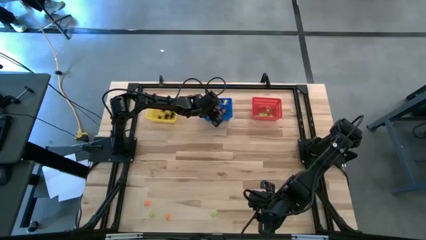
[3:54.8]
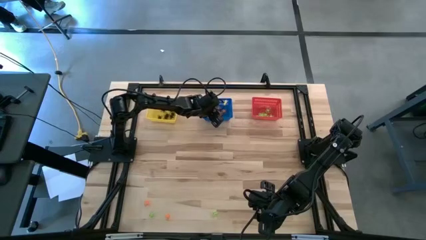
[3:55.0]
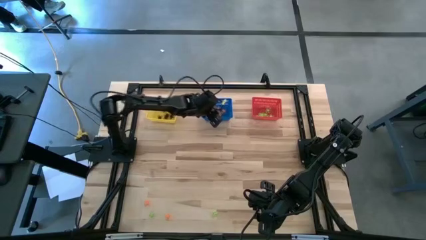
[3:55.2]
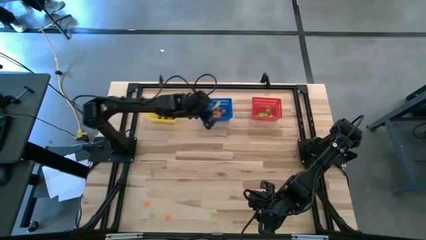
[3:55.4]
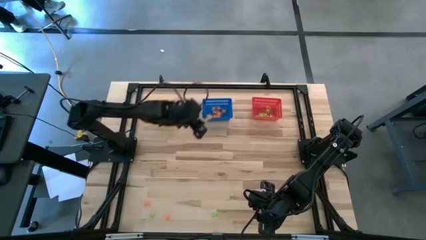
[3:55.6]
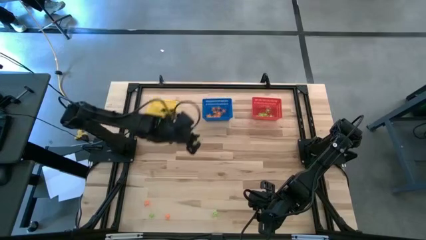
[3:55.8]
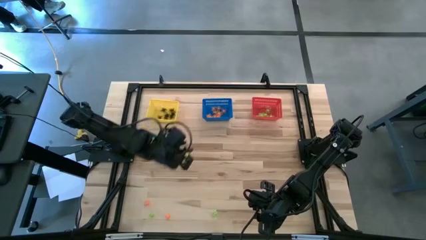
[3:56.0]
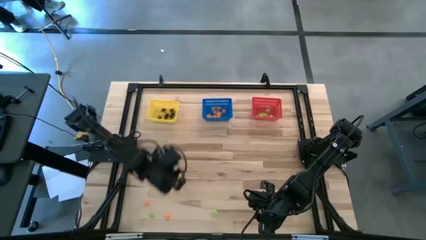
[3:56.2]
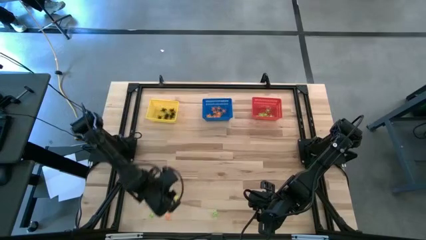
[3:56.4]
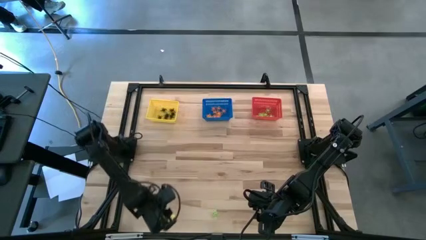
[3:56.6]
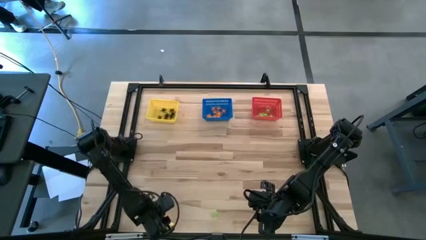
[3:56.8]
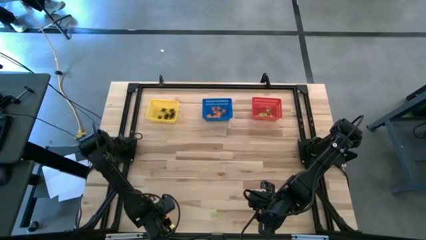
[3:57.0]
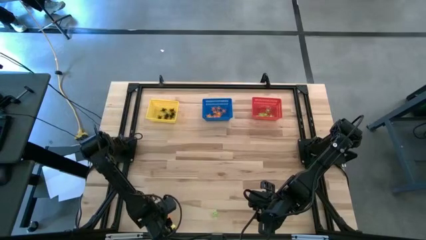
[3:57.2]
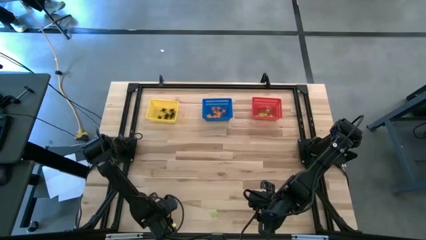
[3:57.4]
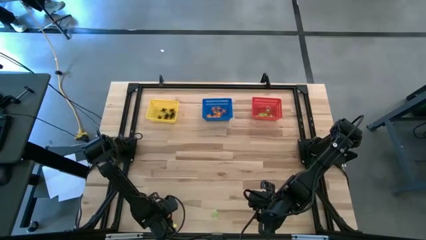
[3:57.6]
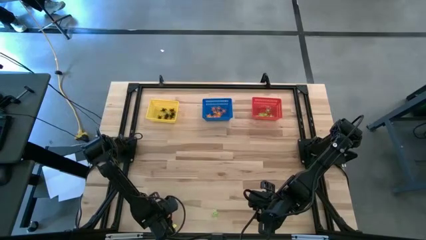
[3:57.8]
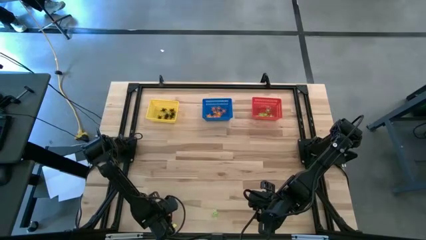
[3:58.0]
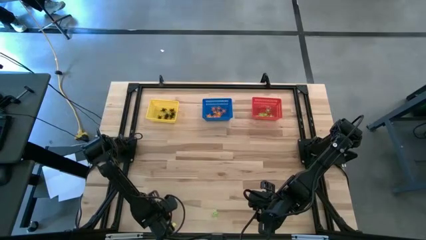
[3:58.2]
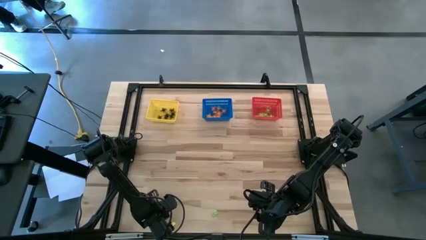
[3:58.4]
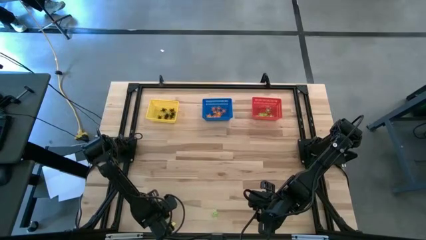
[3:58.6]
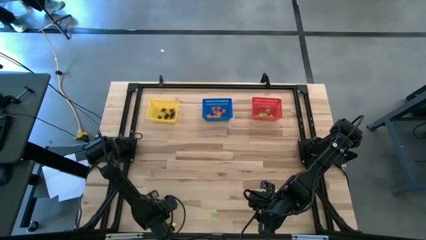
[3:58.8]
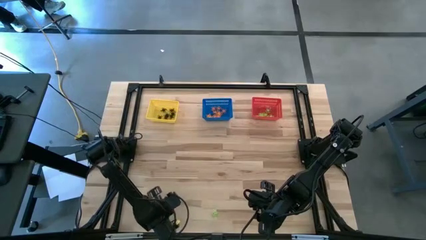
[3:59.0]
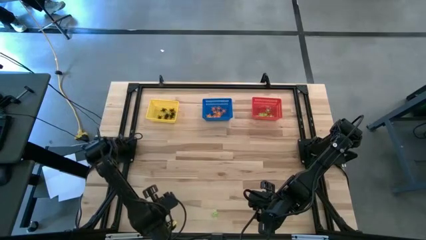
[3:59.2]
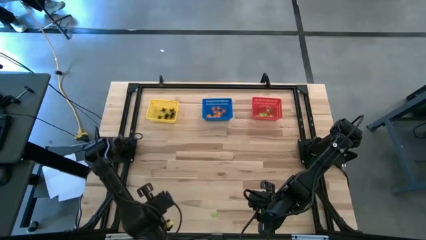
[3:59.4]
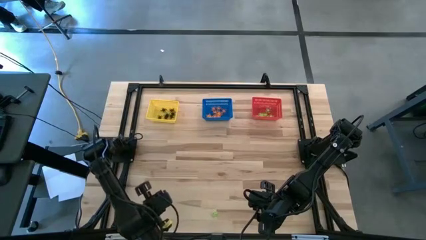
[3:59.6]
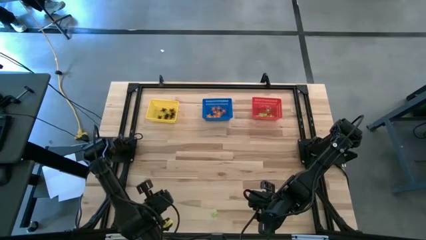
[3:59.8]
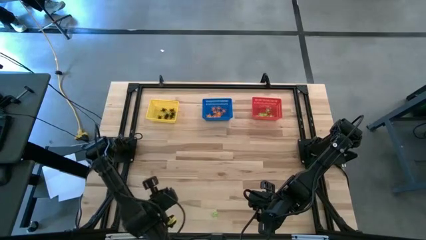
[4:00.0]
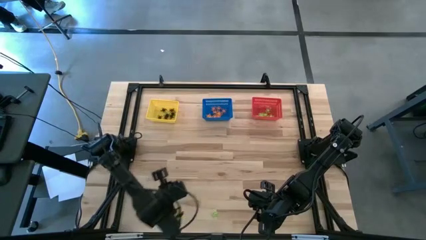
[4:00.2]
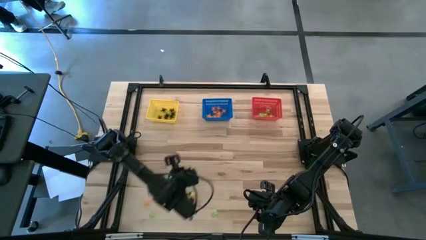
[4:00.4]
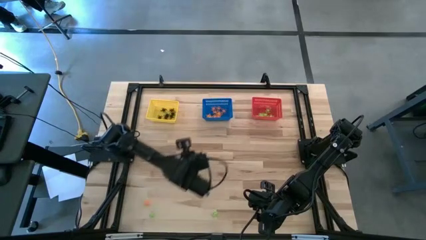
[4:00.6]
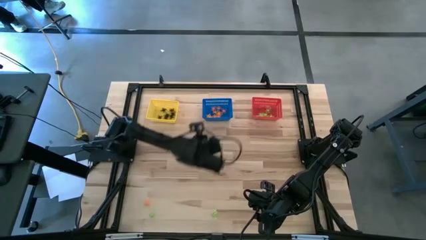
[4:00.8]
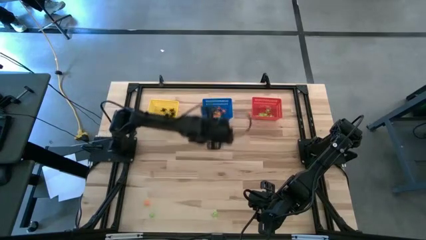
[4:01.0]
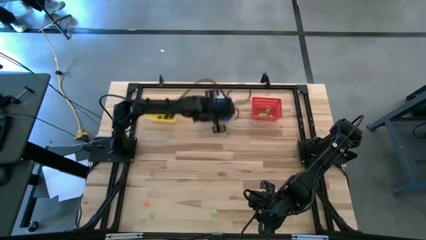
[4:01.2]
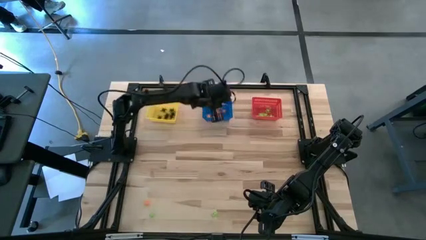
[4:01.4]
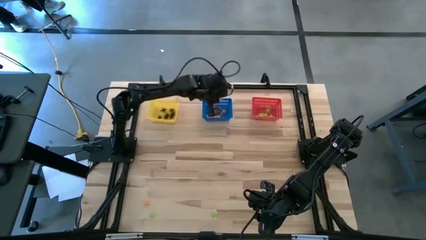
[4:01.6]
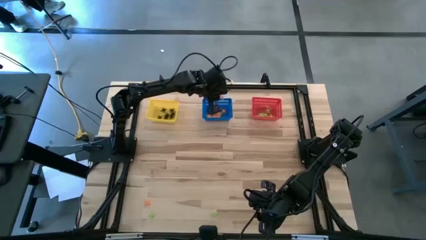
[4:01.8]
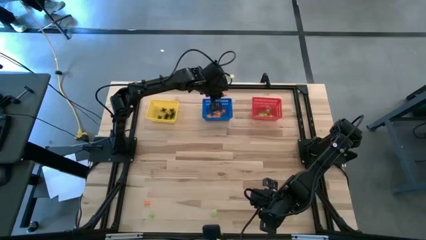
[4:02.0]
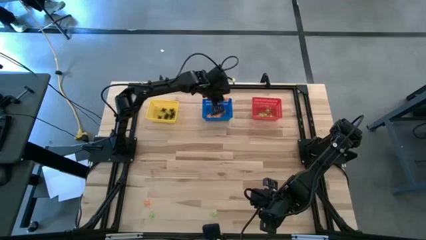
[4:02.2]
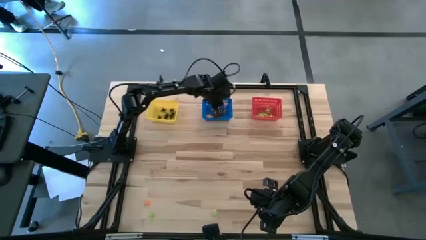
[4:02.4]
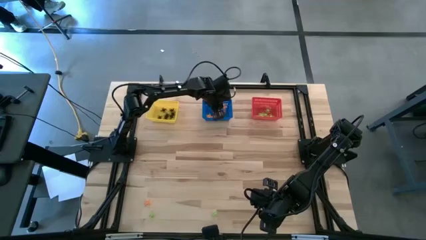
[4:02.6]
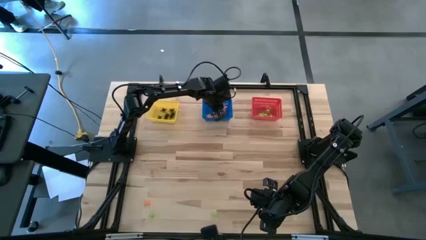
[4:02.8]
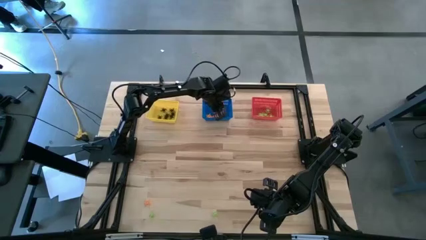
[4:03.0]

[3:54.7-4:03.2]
Task: Sort Halloween decoration
Put the orange spider toy into the blue basket

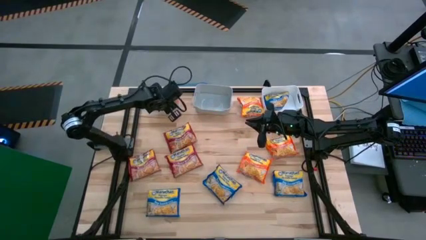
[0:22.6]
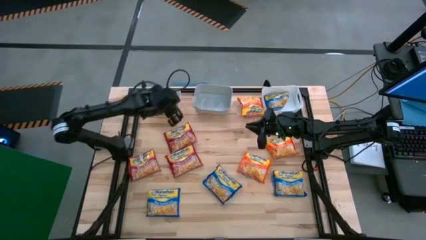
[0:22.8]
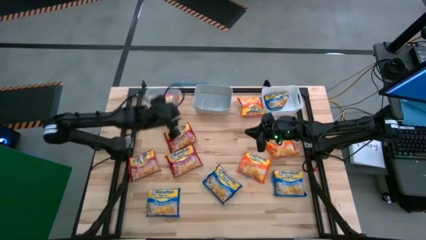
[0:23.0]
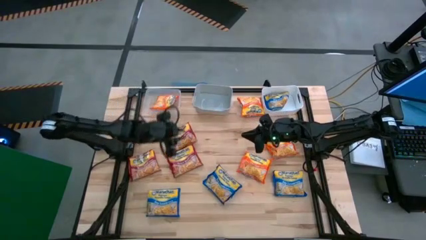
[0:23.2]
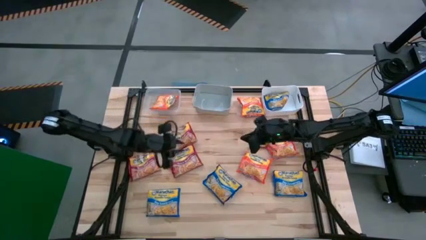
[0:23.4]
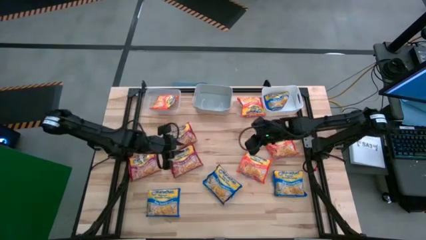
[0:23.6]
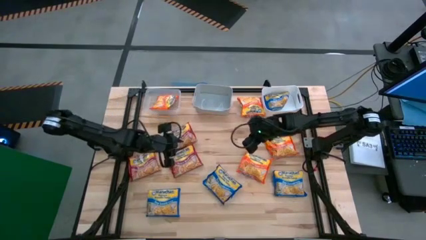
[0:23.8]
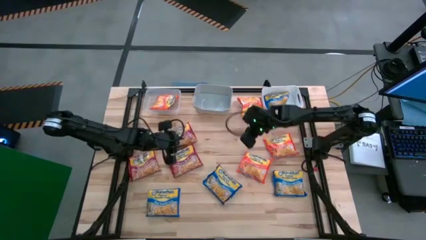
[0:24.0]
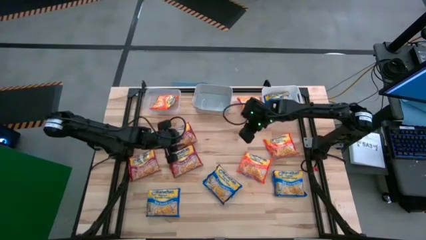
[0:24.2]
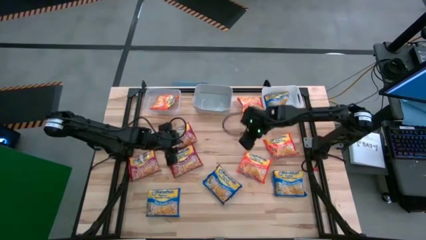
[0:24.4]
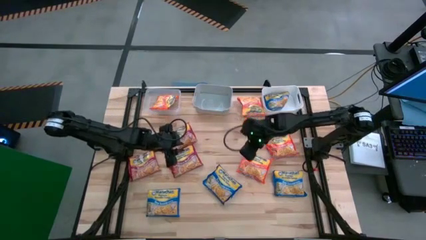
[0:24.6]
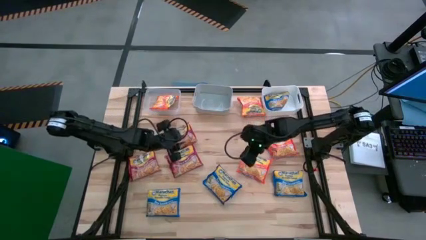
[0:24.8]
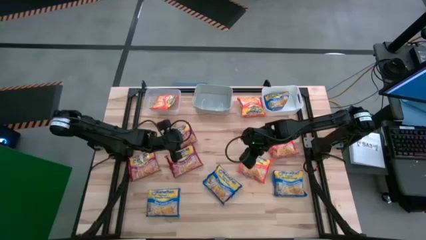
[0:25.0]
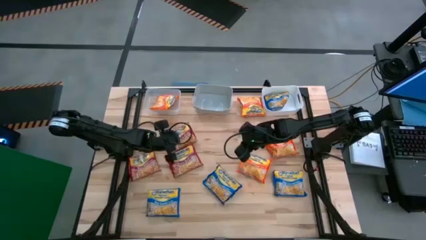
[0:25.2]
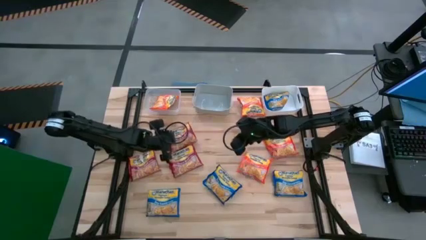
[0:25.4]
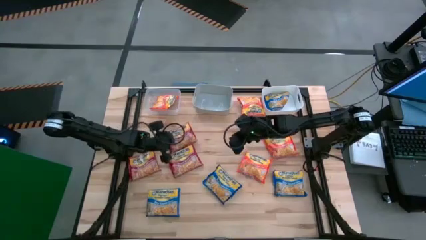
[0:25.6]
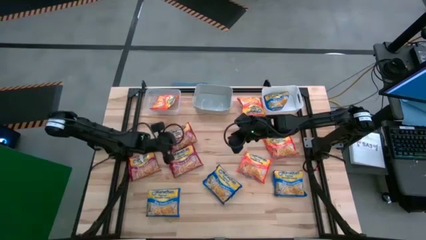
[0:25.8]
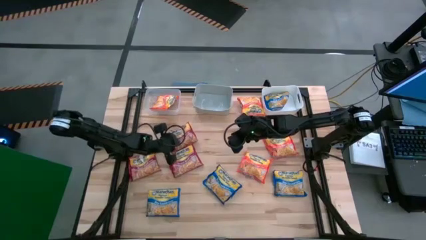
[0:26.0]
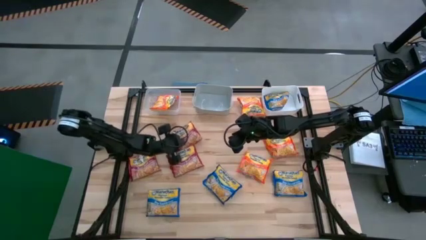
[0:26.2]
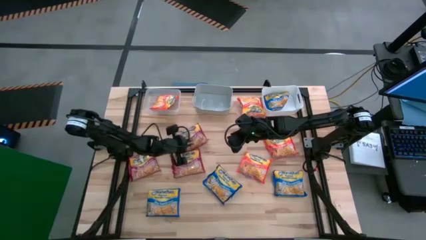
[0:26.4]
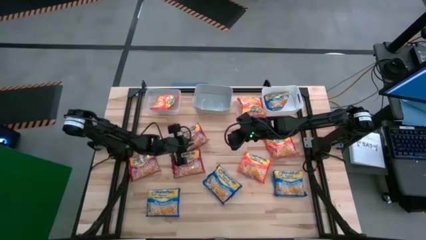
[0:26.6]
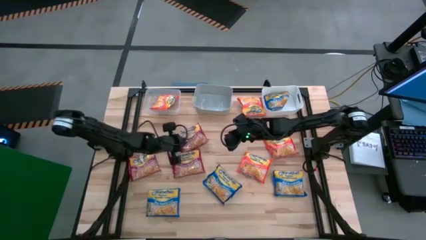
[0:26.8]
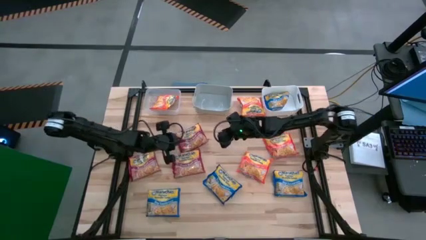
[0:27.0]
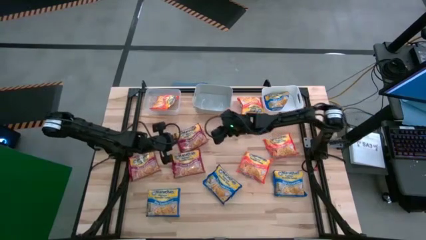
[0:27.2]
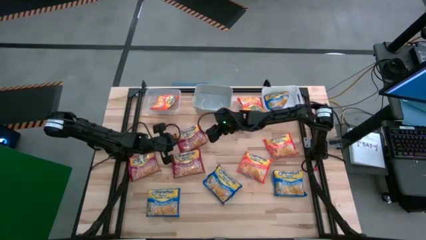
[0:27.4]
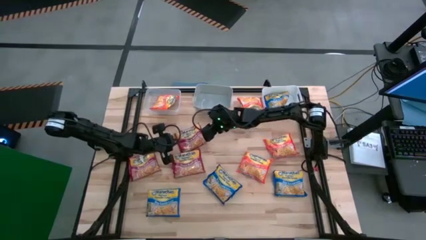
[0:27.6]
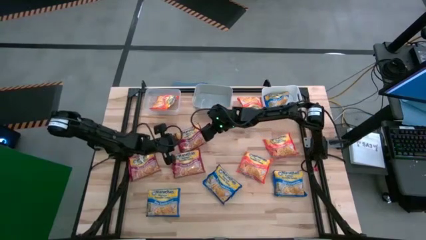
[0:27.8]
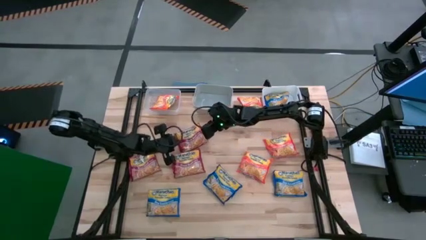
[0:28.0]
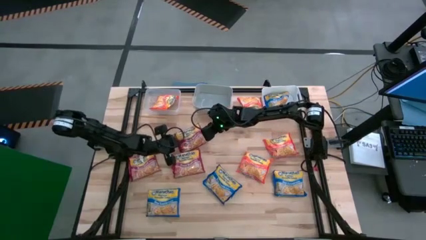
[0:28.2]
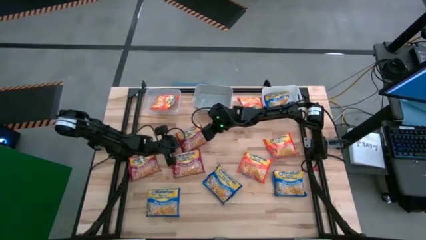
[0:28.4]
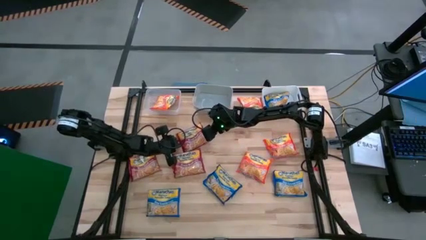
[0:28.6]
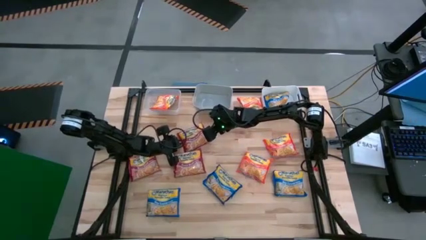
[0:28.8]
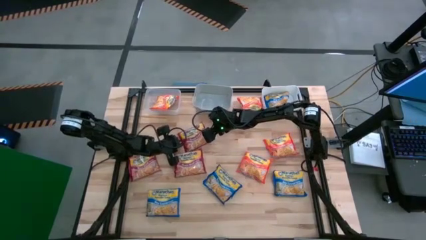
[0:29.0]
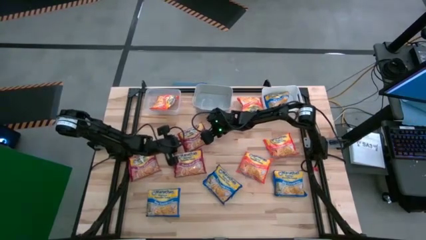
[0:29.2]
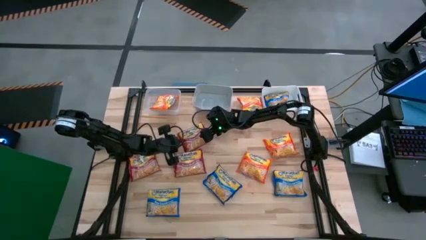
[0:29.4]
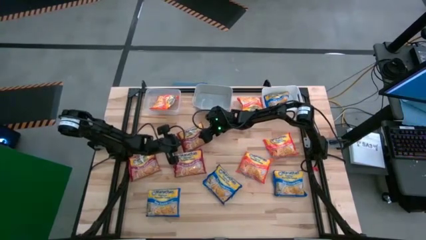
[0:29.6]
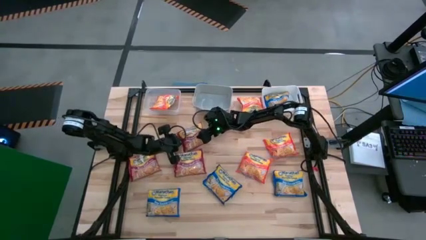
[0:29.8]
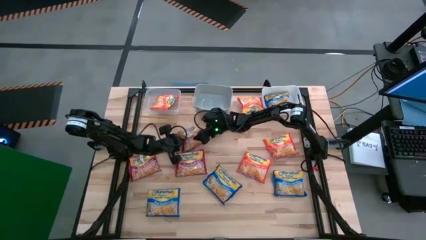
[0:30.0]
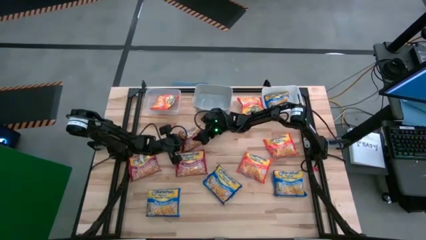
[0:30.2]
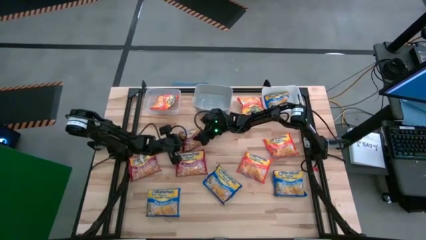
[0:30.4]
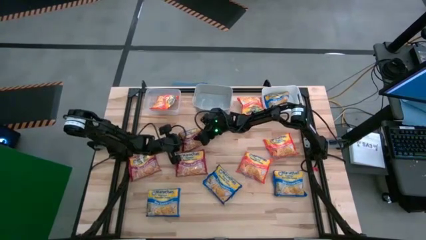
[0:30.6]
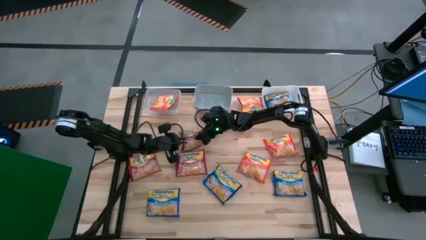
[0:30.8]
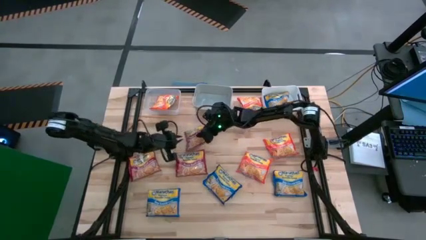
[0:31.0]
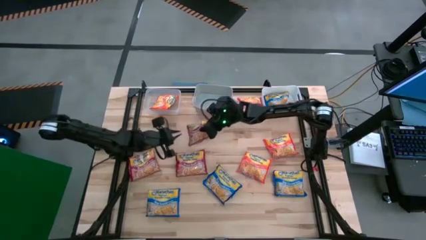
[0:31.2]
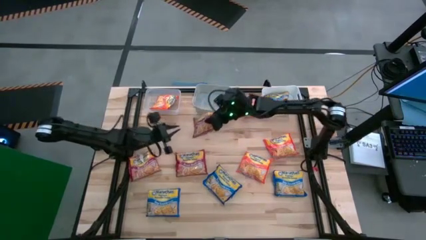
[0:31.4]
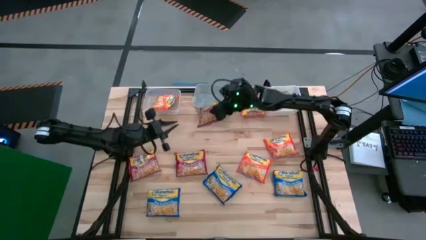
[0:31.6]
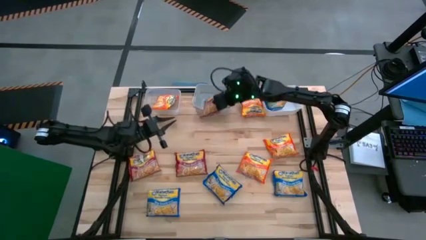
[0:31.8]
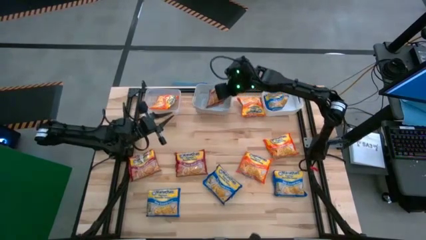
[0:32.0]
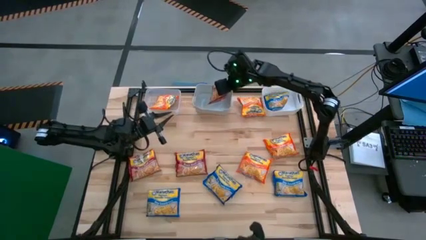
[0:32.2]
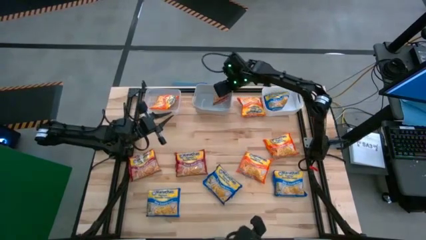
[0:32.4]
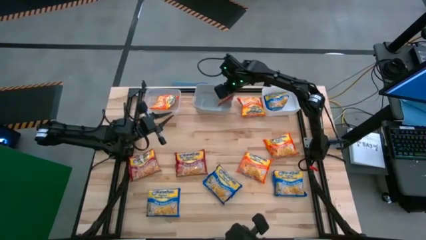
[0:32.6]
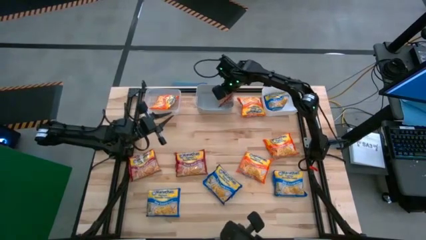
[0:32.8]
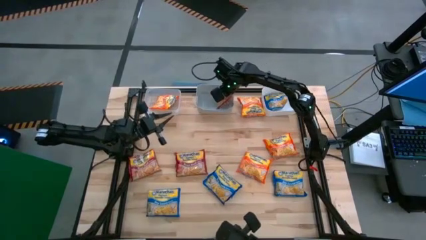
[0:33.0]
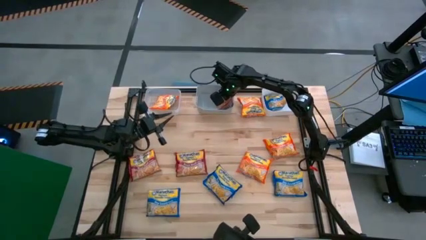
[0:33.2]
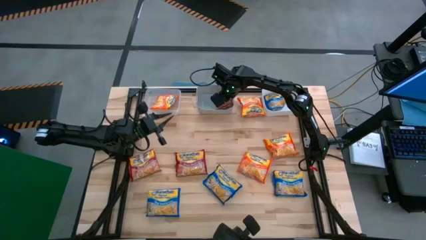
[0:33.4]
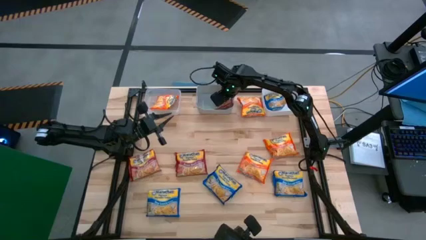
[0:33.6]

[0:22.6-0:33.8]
Task: Sort Maruchan noodles
Put the red noodle pack into the grey bin
